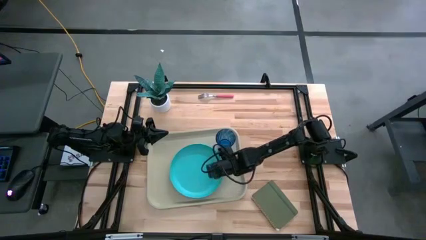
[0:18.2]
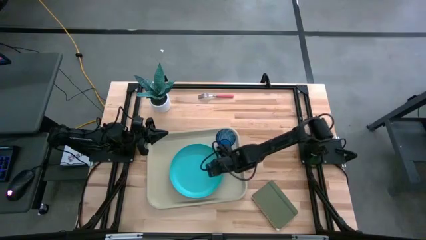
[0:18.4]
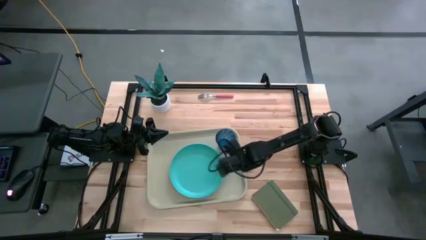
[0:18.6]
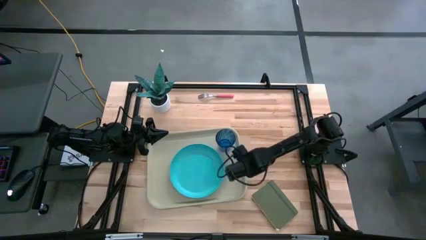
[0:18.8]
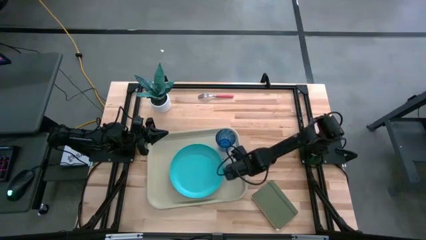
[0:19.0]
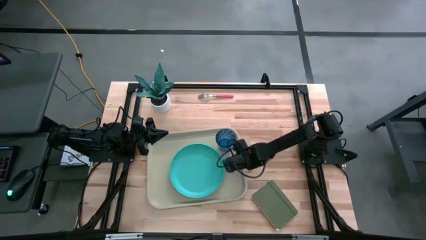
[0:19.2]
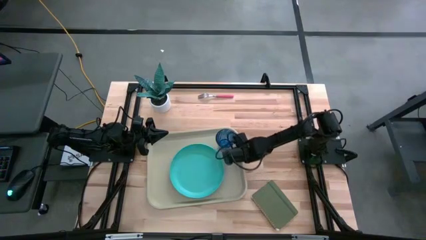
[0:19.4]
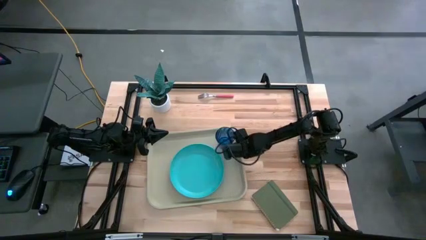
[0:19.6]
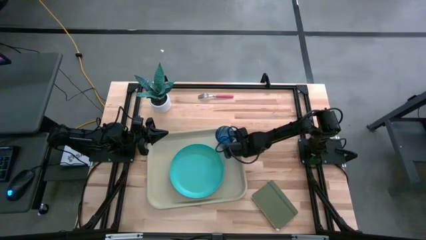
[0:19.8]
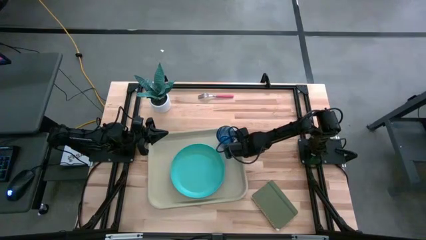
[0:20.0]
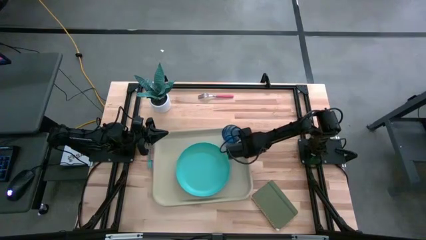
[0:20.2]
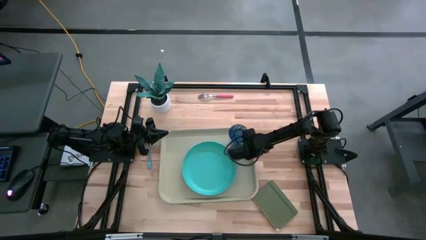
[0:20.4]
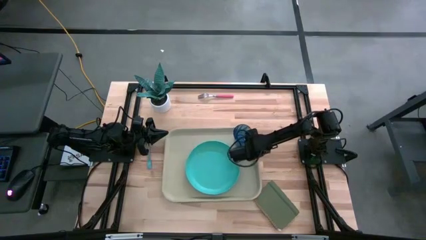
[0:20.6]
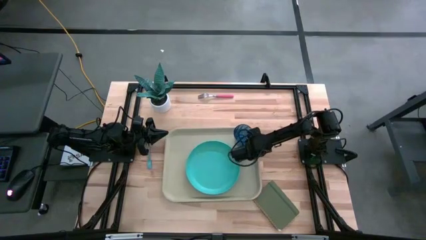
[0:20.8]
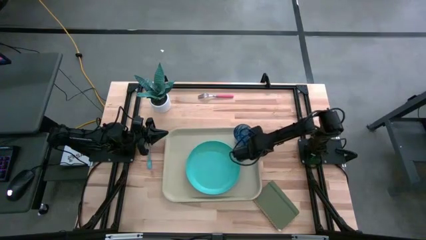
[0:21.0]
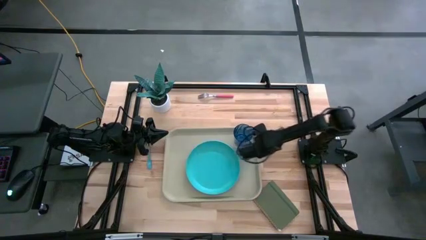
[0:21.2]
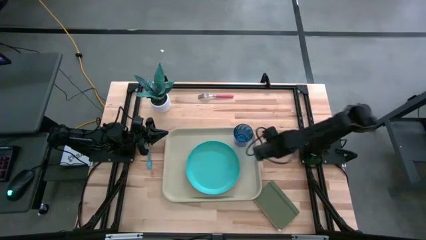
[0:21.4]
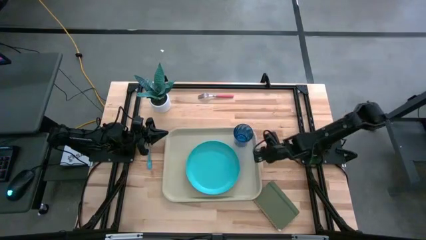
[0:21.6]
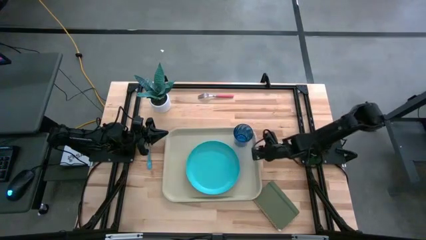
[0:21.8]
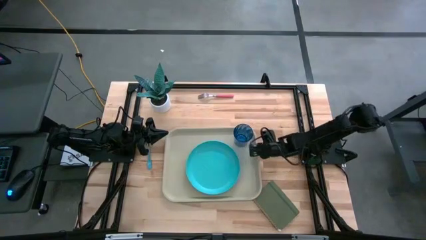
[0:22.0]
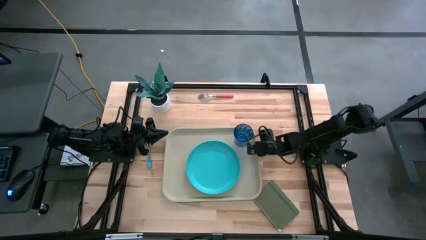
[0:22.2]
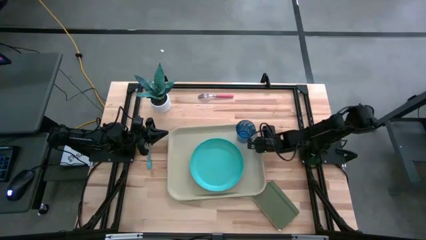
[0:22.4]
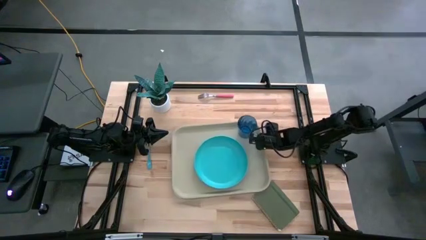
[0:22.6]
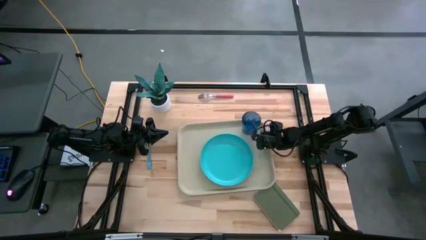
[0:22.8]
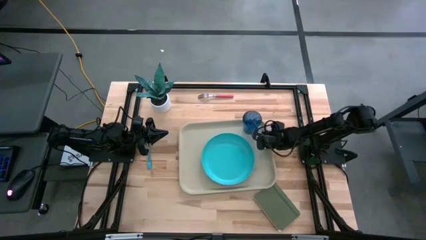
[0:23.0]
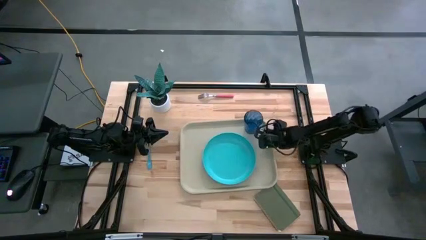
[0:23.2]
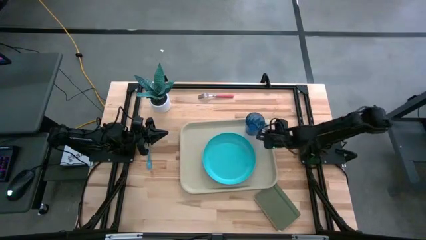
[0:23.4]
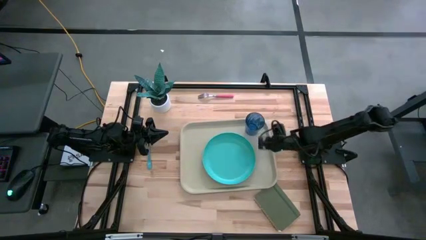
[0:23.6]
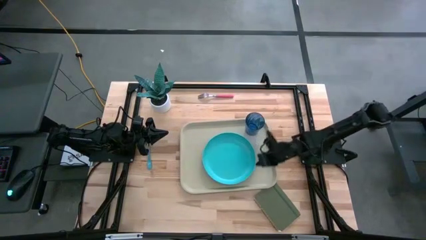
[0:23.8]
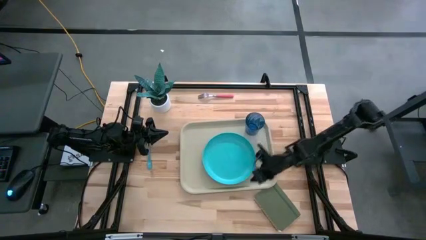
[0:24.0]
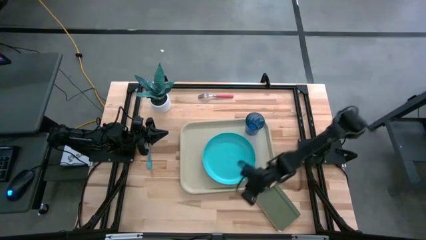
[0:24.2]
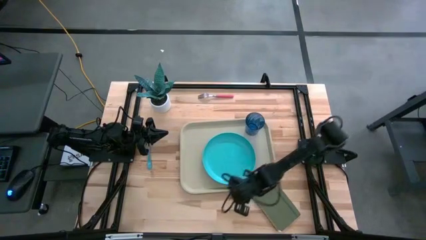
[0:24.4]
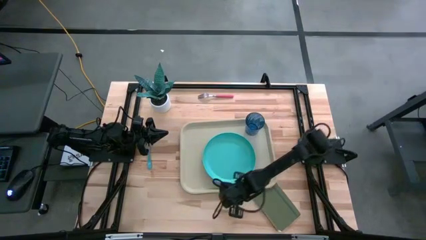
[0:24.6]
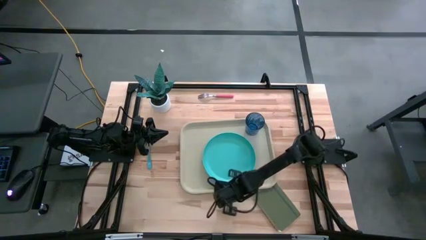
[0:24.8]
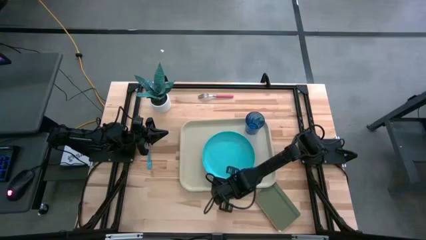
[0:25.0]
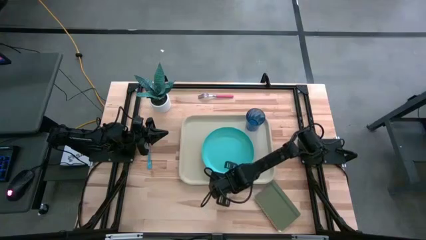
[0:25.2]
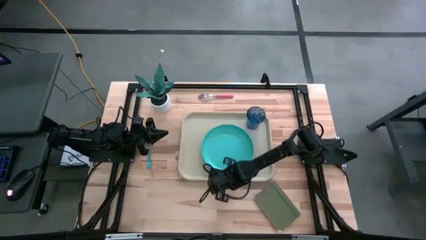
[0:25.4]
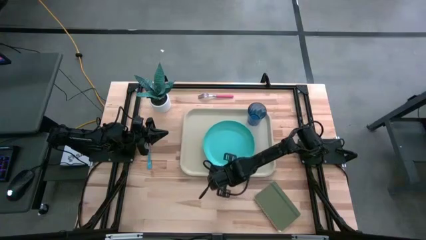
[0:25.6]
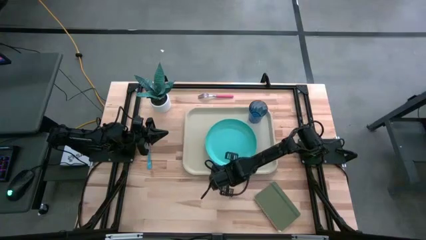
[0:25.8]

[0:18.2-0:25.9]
Task: Pick and place plate/cup/fork/spoon on tray
Adjust the gray tray to the center of the table

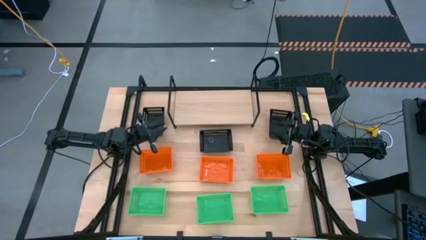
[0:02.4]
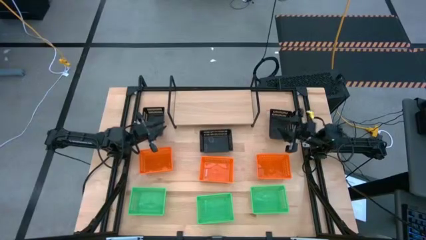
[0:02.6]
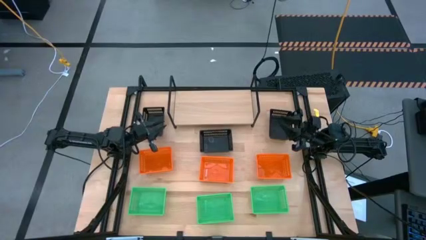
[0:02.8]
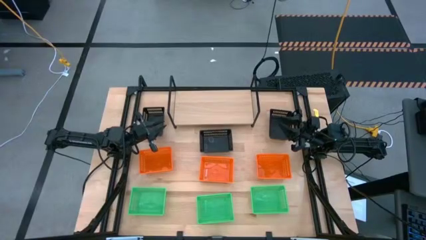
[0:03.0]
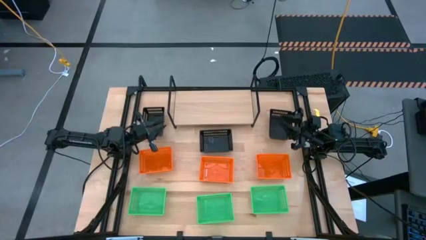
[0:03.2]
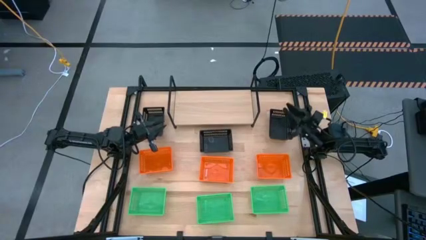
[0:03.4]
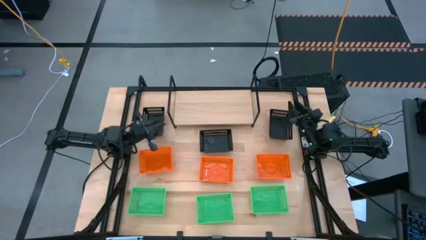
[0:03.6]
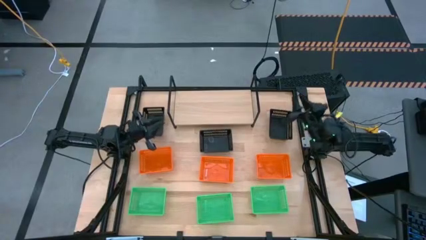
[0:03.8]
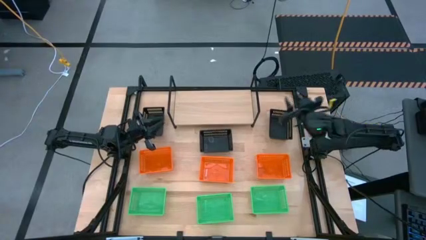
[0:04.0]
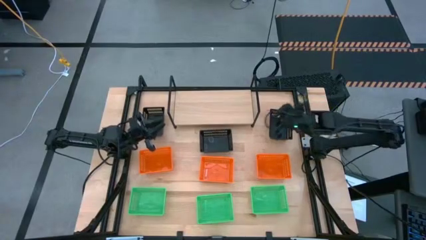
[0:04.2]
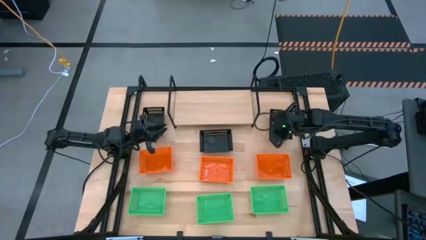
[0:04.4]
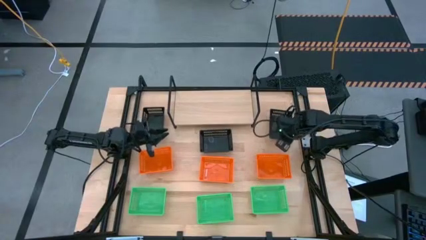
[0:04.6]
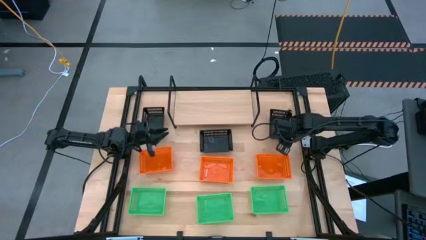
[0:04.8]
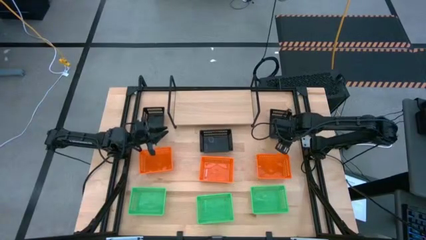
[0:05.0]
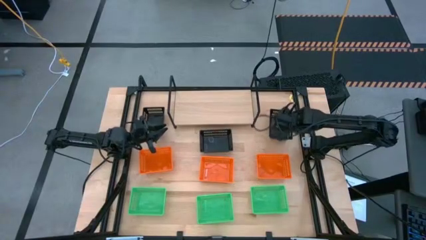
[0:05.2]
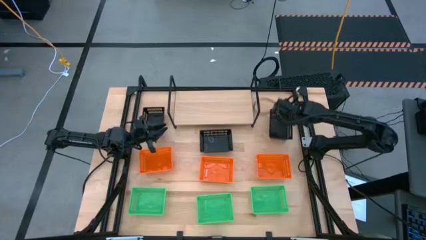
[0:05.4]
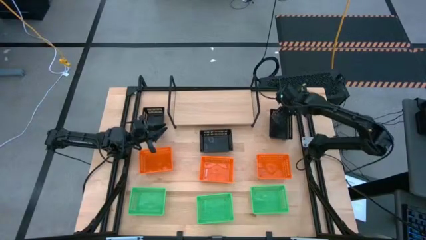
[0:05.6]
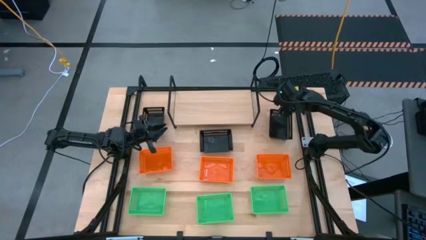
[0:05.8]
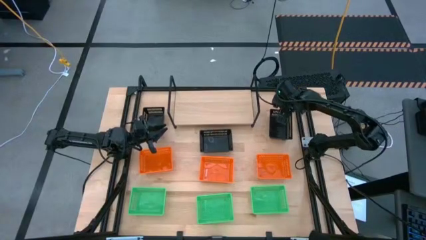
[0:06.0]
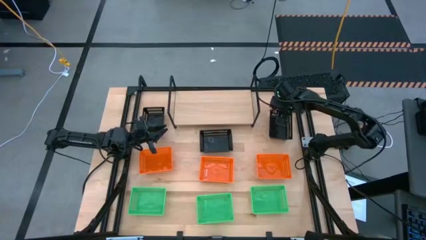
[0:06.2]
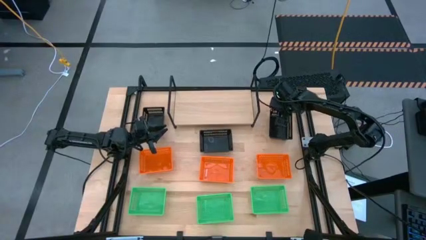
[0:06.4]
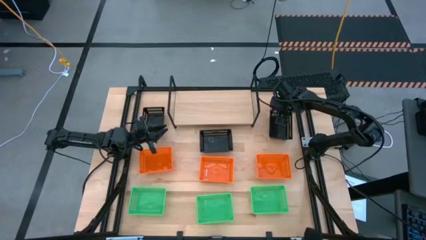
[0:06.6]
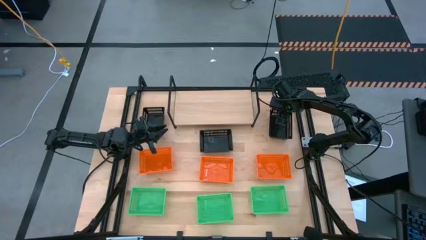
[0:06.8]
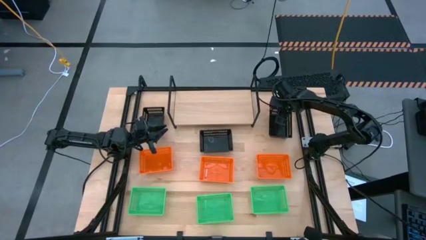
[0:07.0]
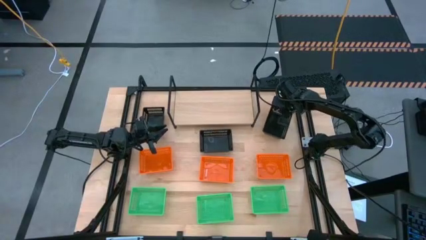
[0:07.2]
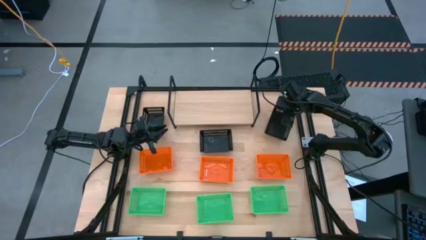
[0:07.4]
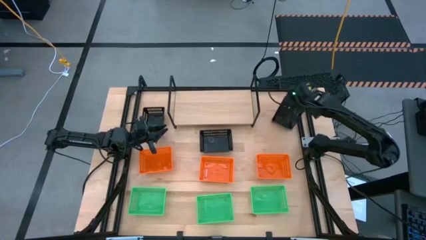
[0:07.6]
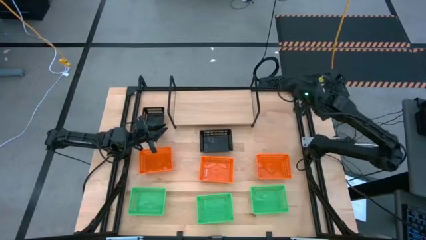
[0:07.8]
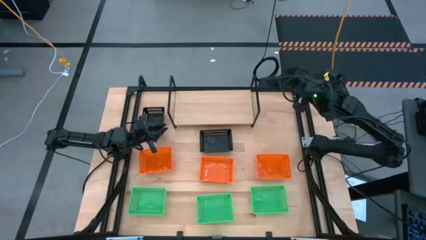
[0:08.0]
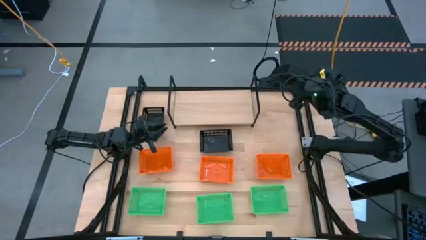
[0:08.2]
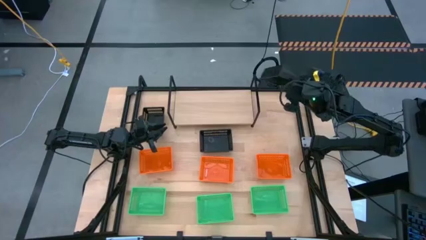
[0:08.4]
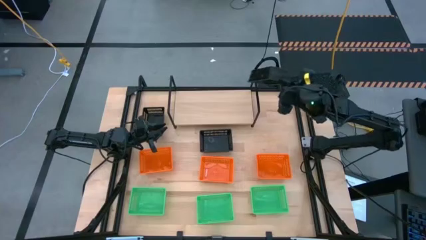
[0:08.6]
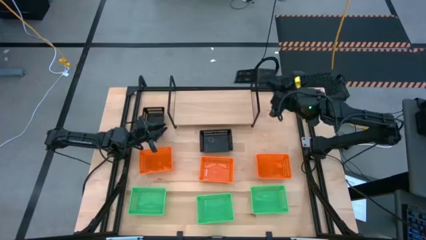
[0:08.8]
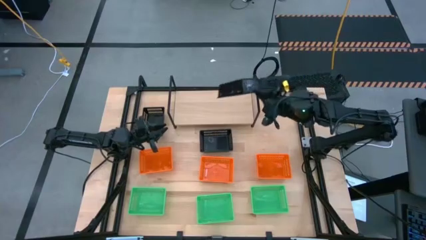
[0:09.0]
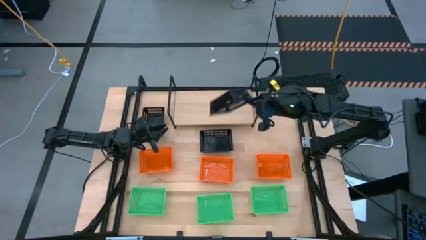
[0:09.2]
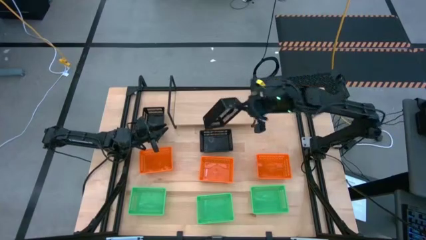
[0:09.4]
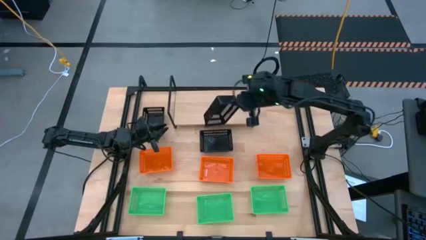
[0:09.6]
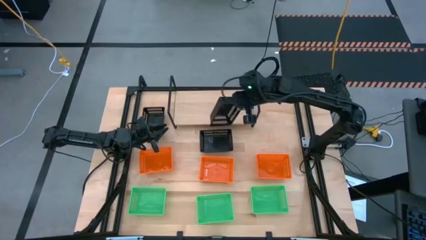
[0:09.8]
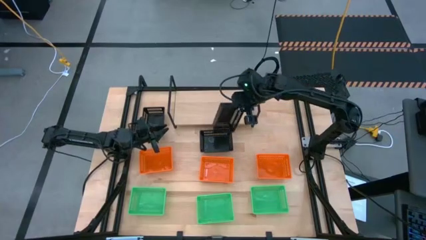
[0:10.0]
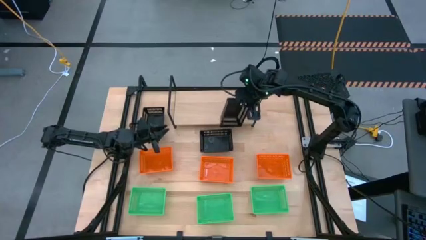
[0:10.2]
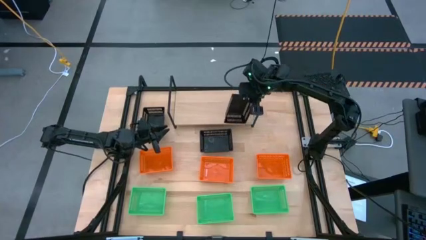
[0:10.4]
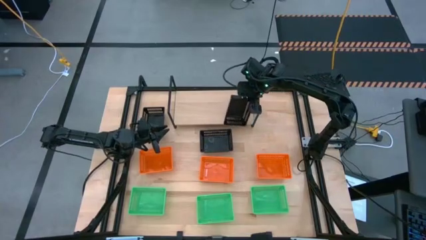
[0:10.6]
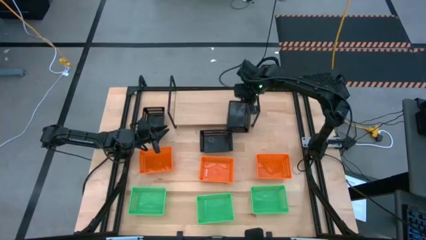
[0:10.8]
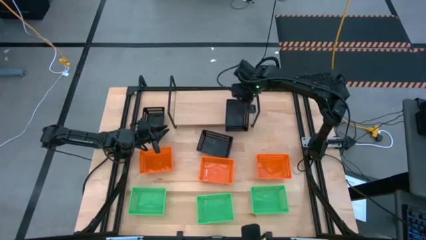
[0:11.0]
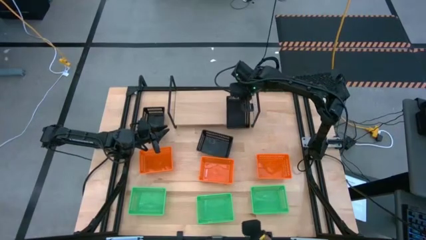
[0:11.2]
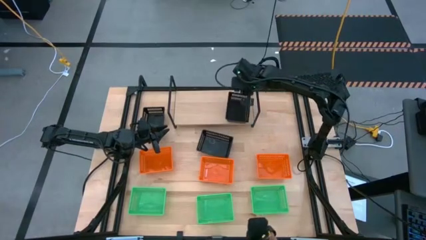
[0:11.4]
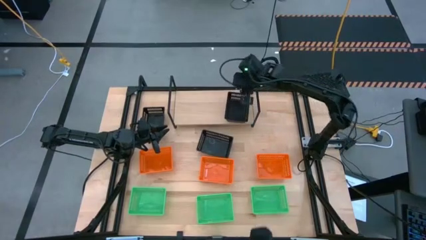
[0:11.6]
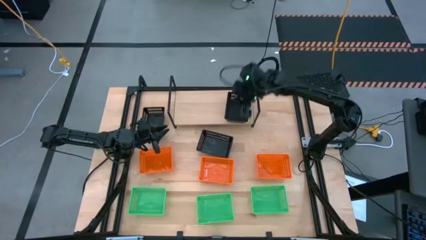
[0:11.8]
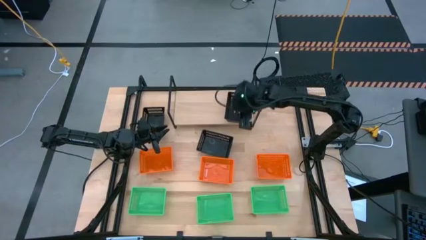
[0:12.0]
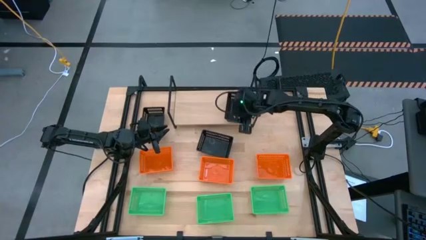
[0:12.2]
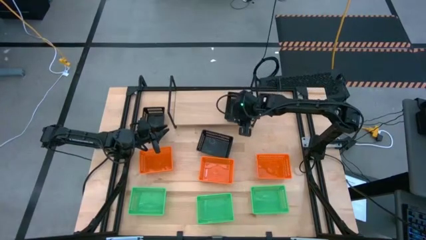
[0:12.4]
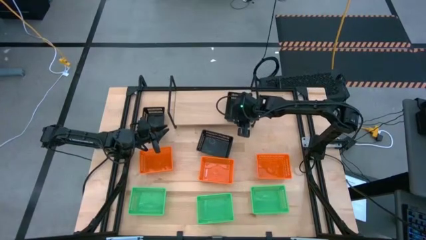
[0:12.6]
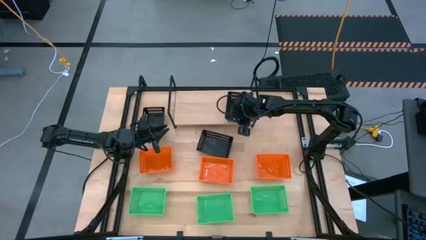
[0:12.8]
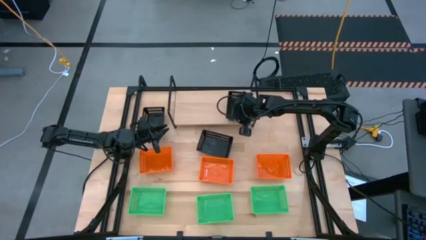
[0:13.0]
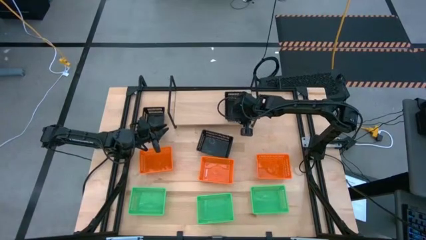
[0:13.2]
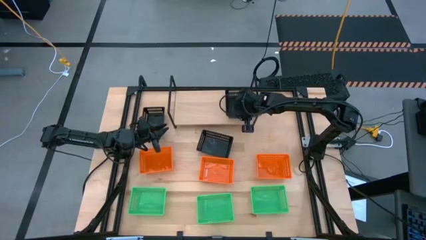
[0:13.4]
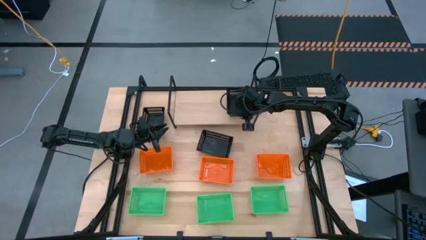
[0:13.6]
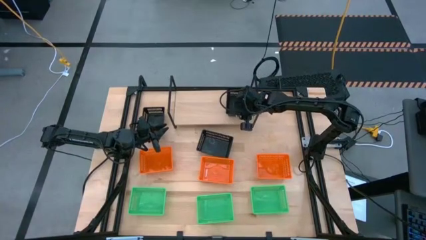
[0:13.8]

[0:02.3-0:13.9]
Task: Stack baskets on shelf by color
Put the top right black bin on the shelf
